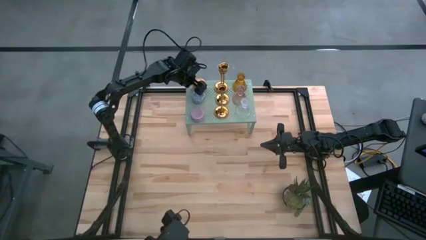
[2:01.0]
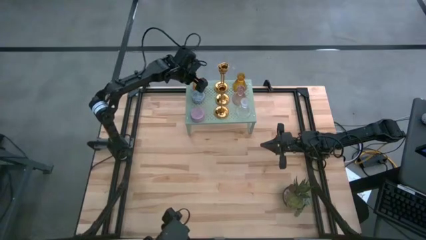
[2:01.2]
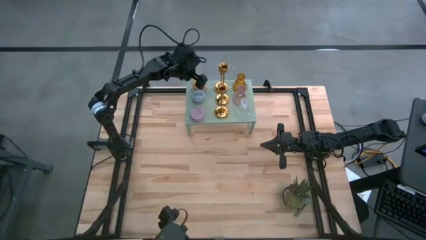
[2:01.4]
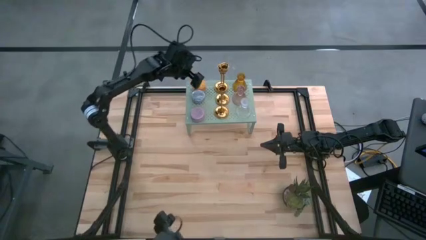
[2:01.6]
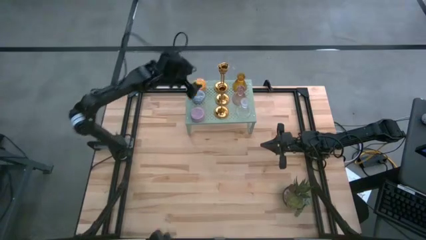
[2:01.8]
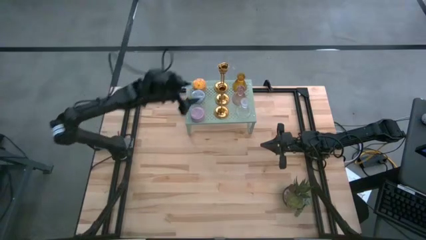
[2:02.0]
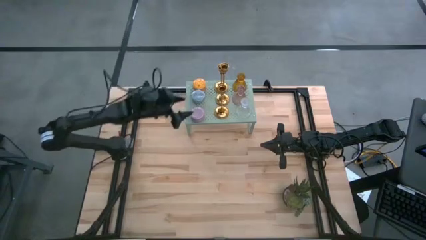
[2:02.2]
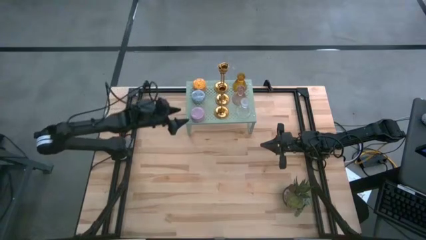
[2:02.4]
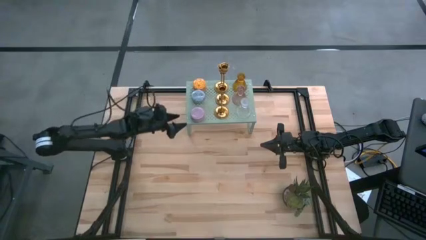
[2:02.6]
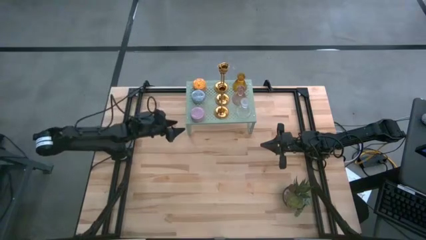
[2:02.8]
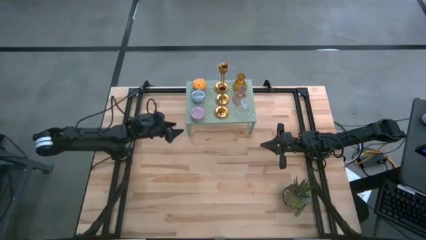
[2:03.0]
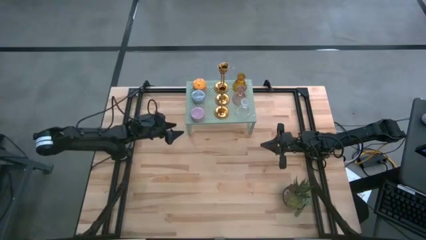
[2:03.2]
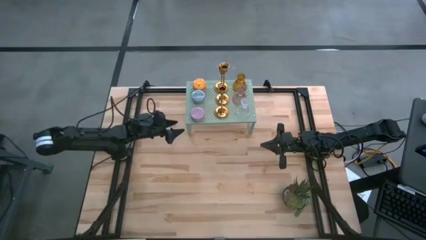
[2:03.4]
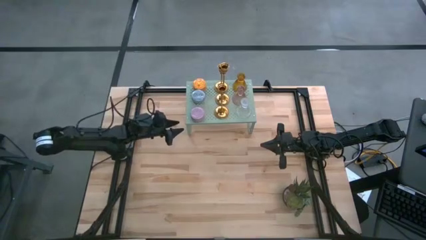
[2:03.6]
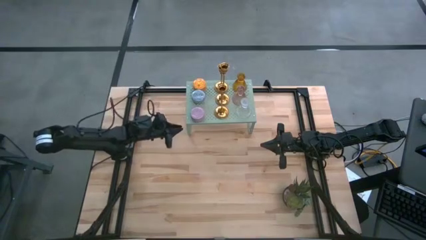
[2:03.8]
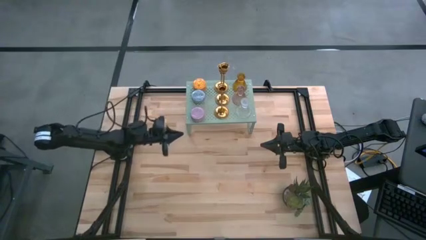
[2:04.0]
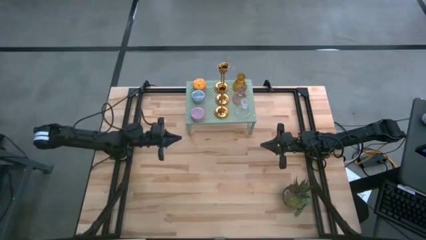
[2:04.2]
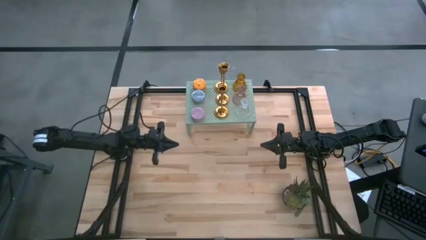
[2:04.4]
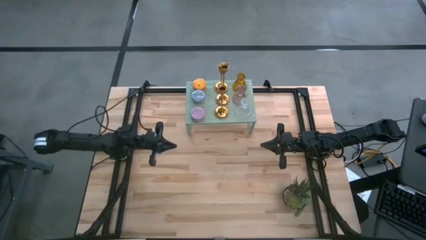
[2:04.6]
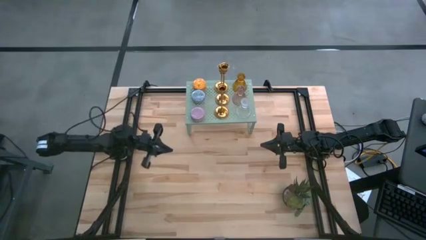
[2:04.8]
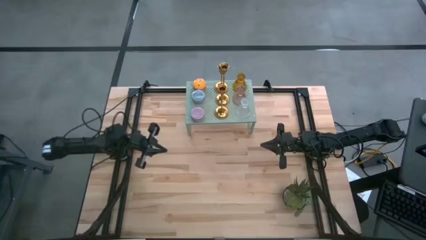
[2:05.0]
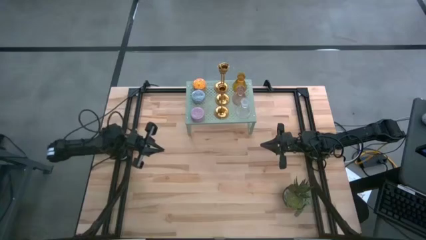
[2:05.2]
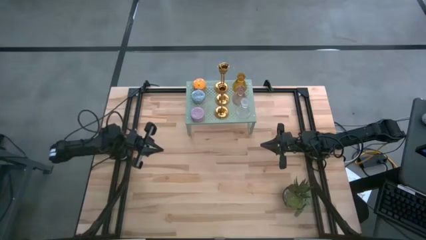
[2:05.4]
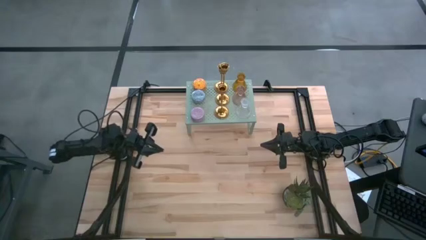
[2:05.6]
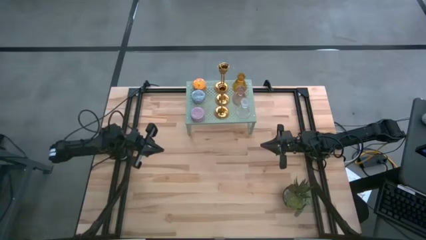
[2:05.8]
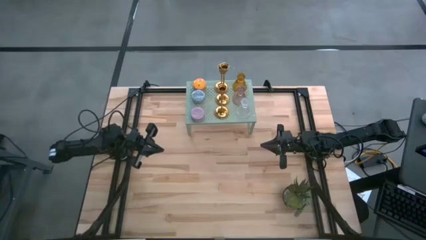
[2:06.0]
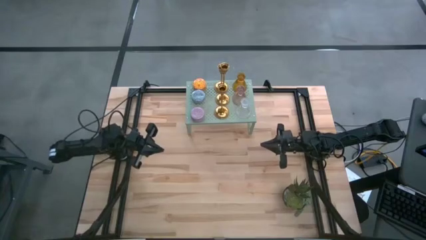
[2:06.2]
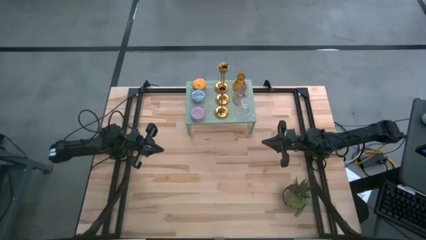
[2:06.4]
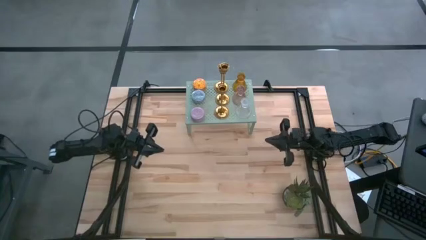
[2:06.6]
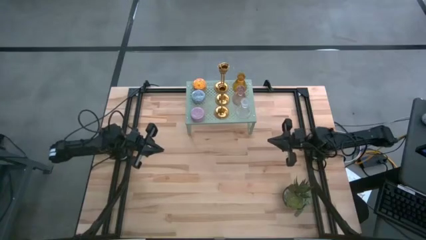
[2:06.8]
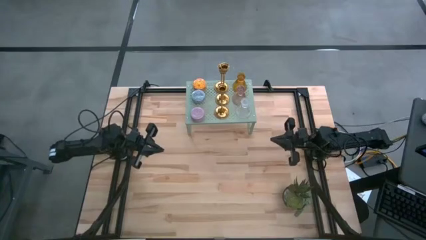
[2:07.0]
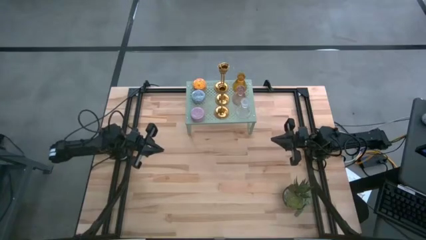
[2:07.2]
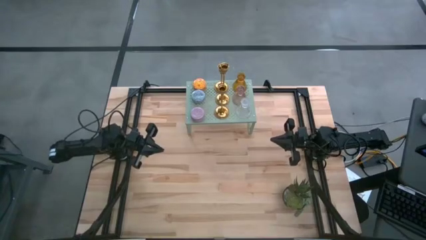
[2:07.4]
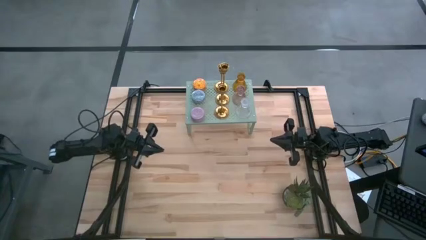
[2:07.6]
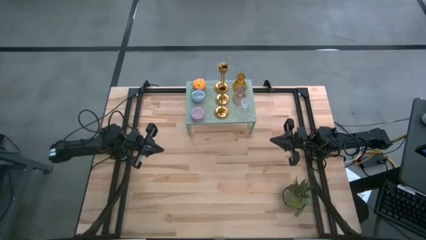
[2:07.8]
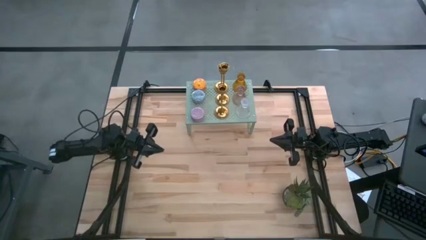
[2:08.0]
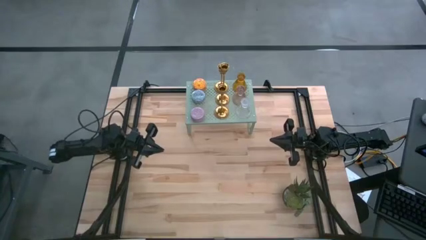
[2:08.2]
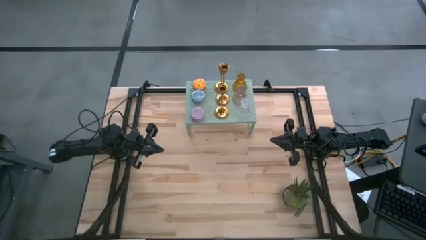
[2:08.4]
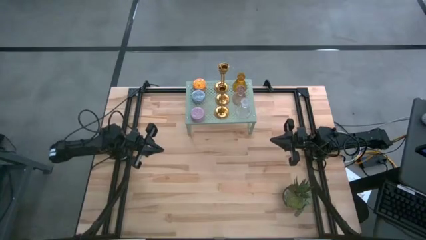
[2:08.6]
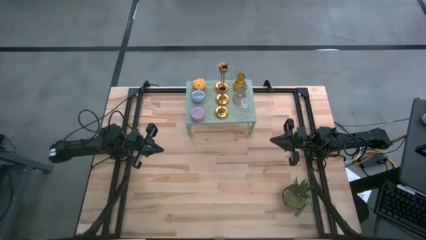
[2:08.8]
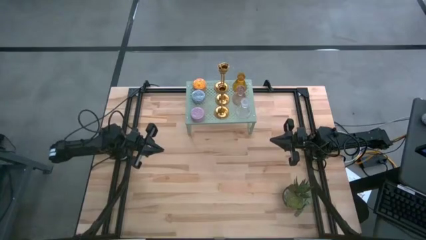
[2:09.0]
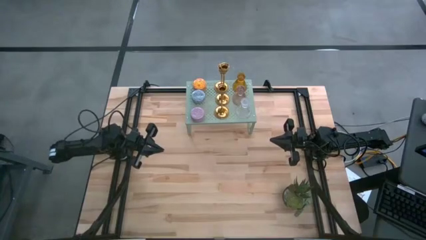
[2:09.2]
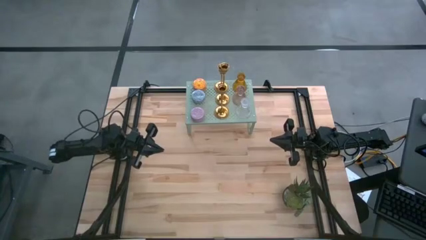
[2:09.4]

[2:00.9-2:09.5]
Task: Pick & Place candle stick holders
Return to Home Position

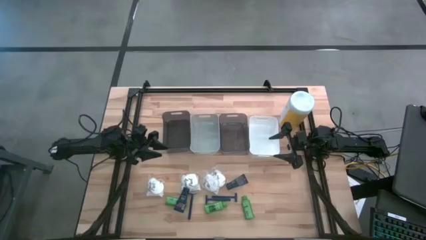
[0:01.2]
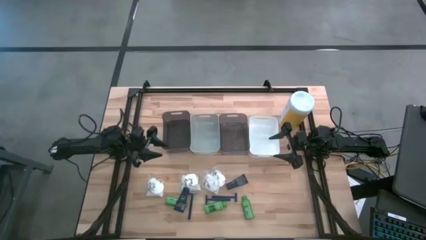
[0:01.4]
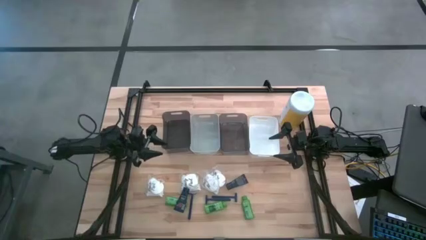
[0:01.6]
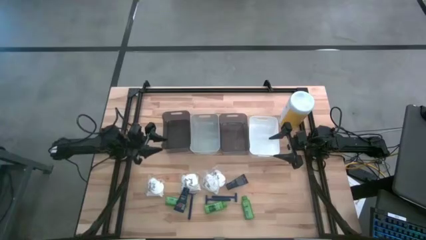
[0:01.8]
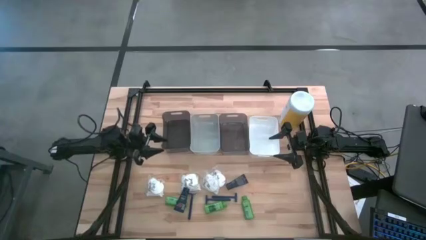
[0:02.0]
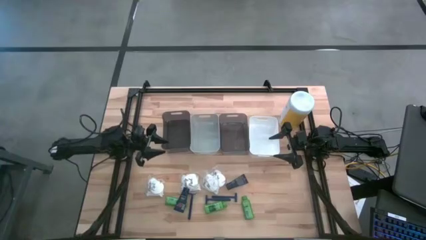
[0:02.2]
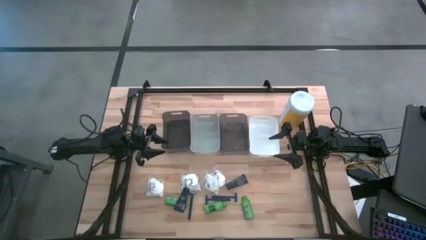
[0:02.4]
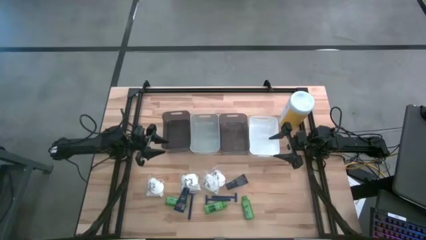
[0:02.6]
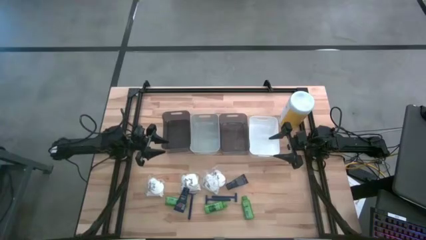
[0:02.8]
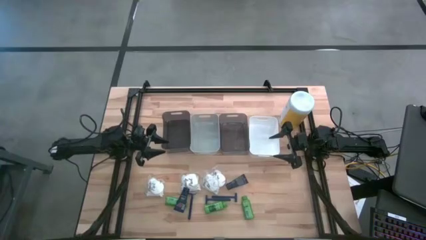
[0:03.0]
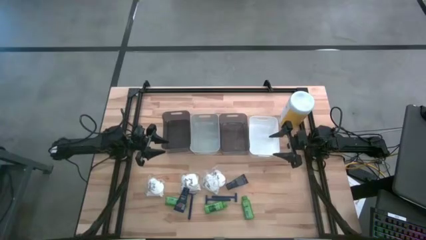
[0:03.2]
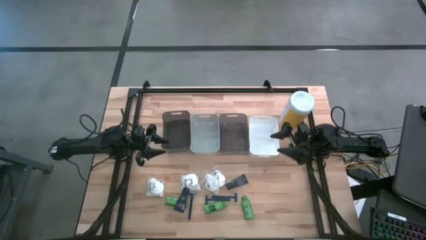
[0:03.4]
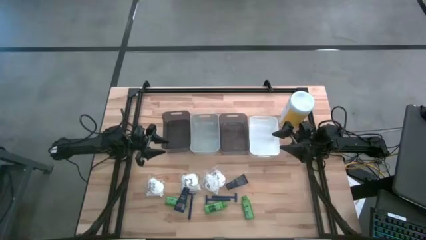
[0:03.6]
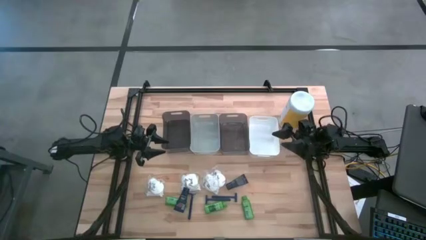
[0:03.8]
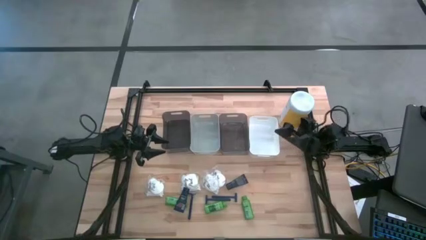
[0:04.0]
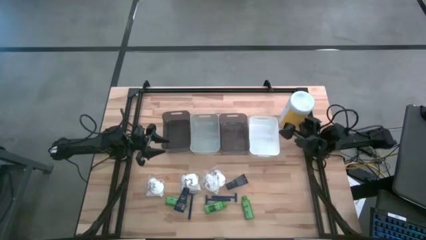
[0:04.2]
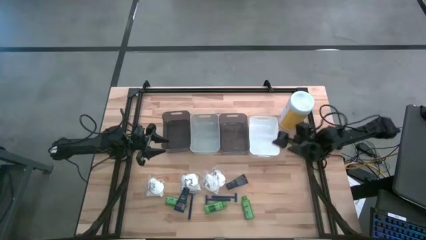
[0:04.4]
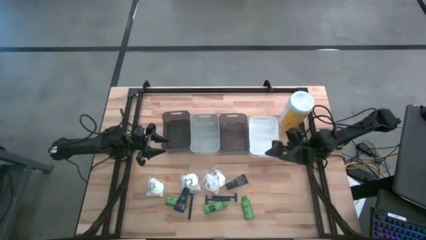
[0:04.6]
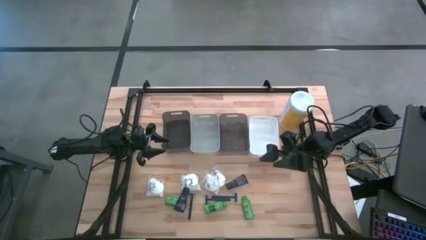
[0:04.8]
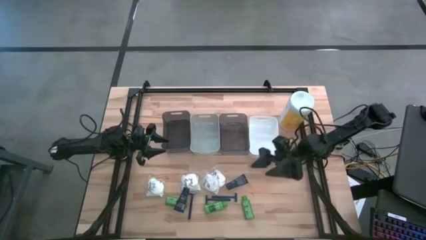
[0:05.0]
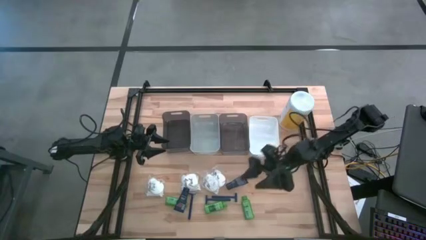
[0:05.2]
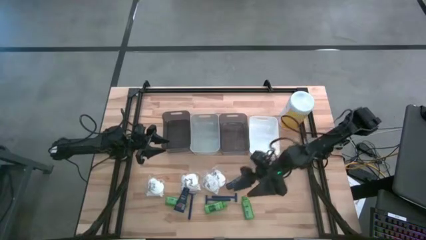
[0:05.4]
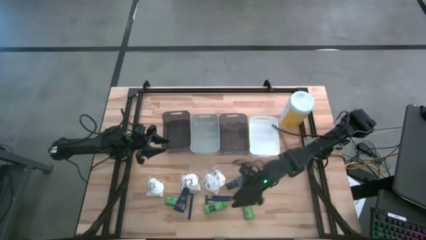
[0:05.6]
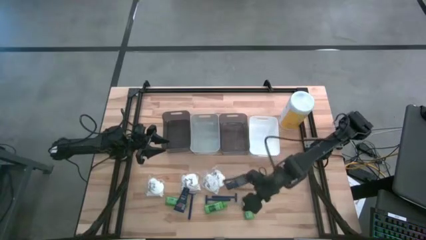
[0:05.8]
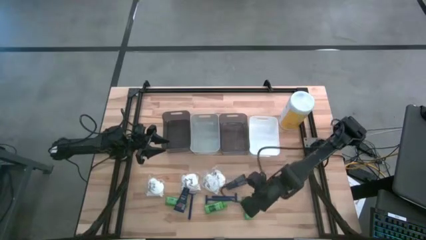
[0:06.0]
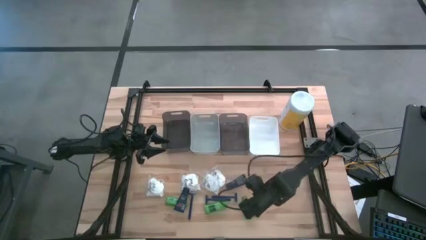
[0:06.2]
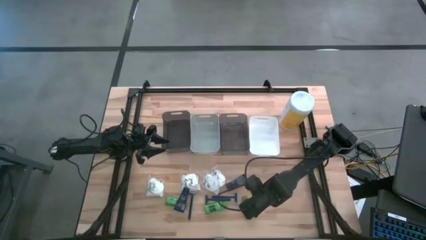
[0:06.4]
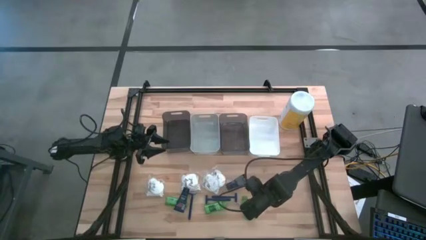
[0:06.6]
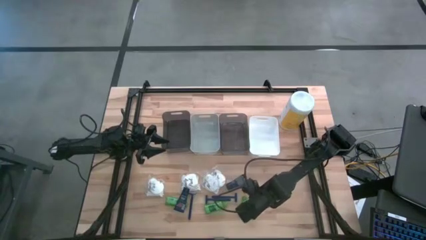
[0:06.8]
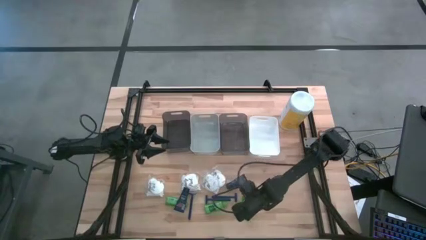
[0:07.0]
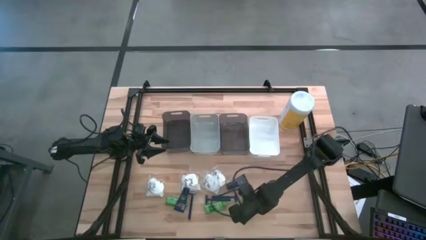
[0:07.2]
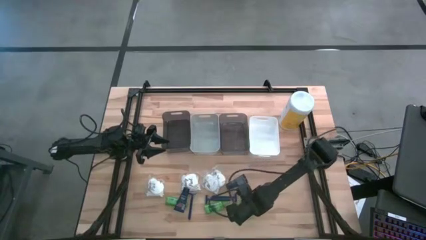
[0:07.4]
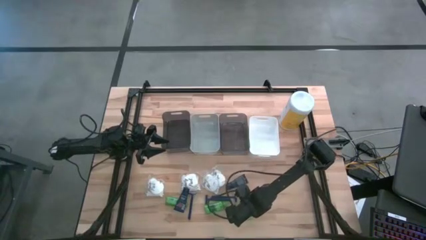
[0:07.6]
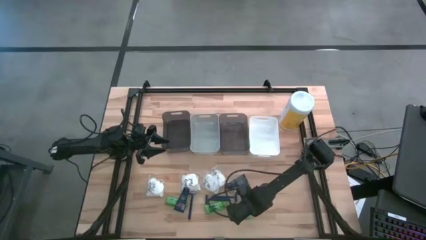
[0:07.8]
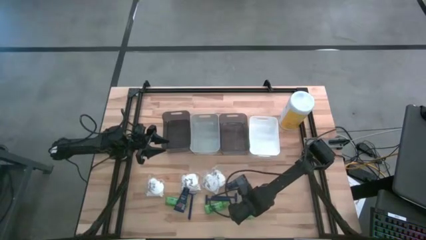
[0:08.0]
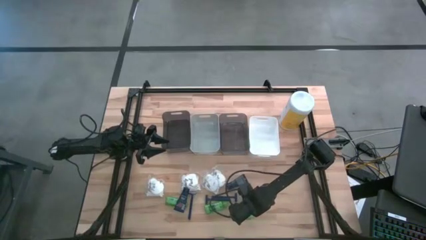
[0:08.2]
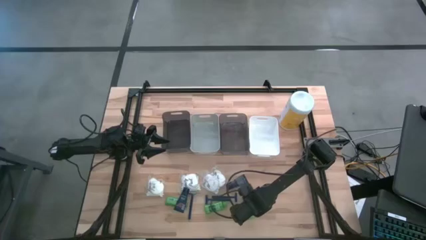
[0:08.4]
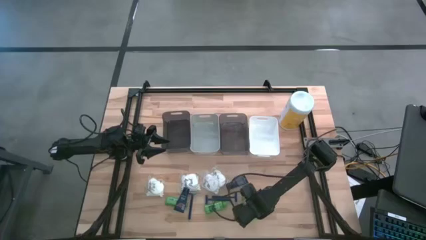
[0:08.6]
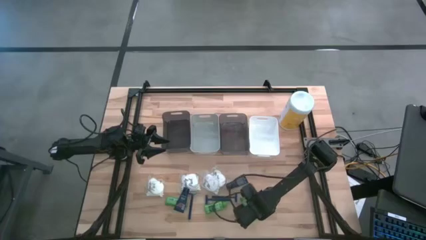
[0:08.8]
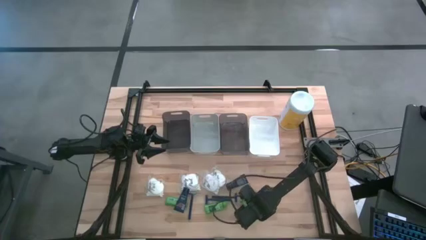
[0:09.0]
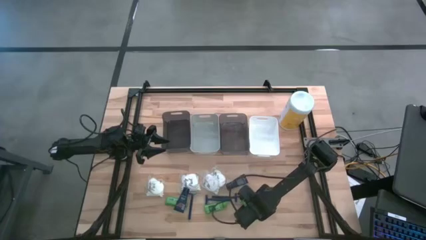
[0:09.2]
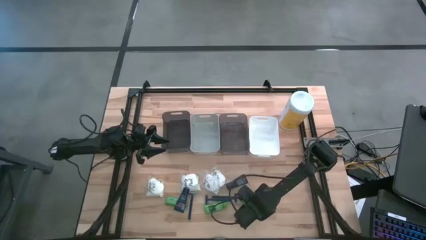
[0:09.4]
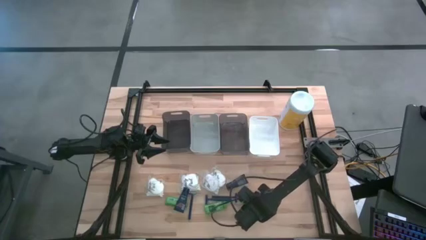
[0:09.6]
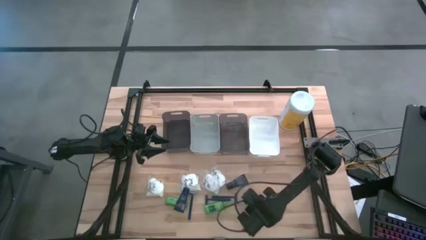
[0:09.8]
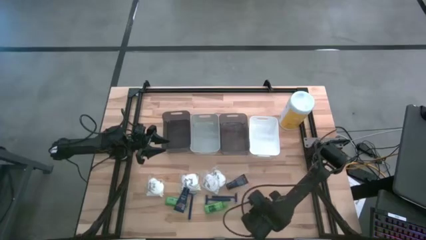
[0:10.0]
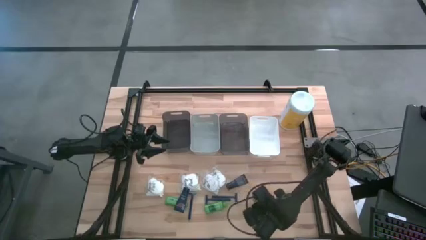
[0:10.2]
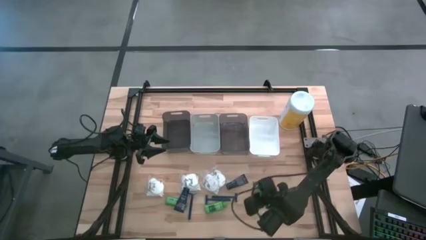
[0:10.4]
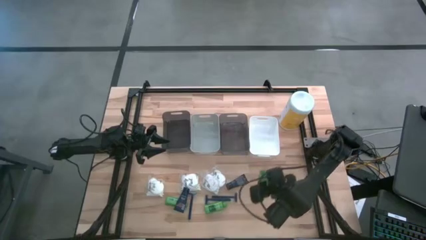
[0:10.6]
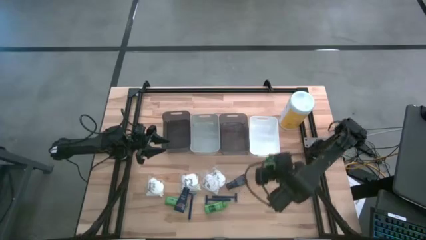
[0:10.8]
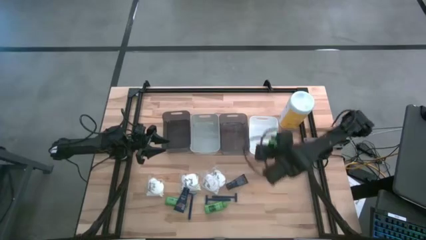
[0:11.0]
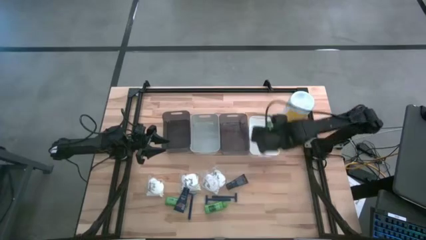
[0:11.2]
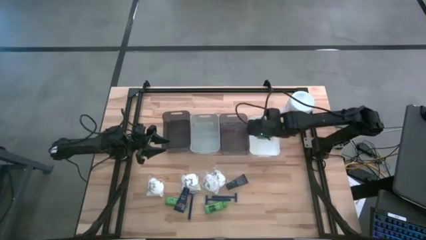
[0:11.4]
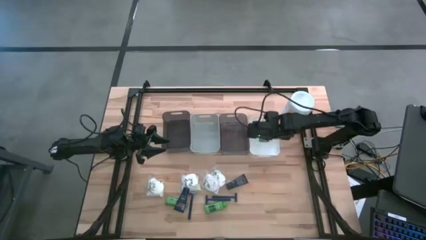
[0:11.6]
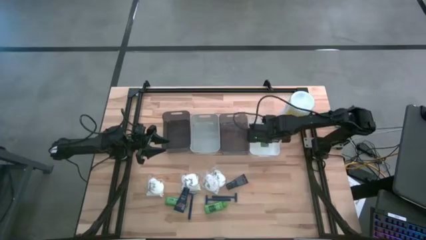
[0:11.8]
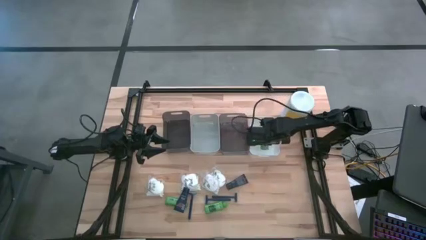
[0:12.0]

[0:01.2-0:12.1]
Task: Pick & Place Travel size toiletries
Put the green shampoo into the white bin
